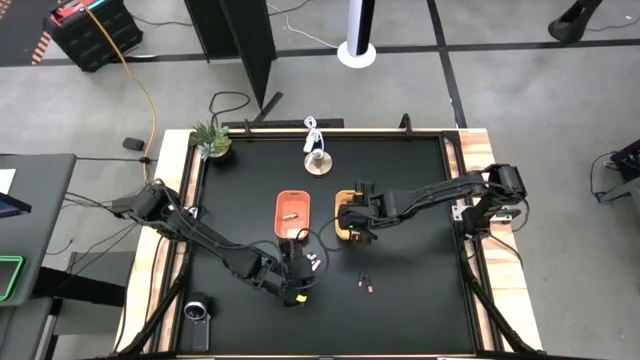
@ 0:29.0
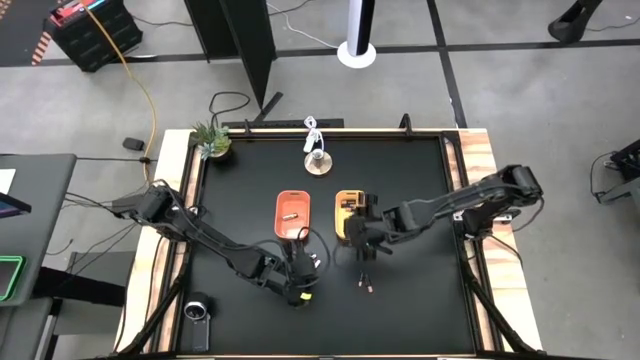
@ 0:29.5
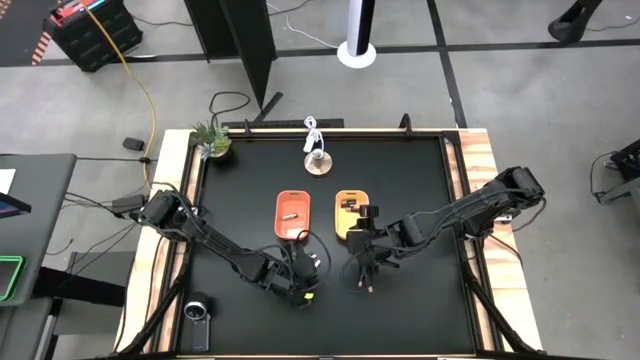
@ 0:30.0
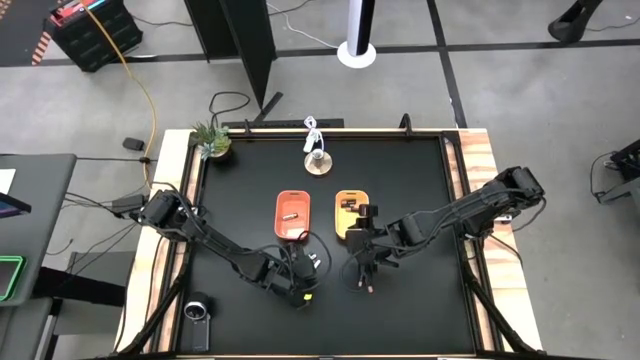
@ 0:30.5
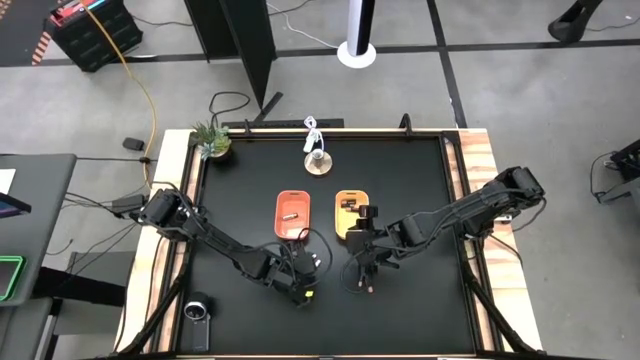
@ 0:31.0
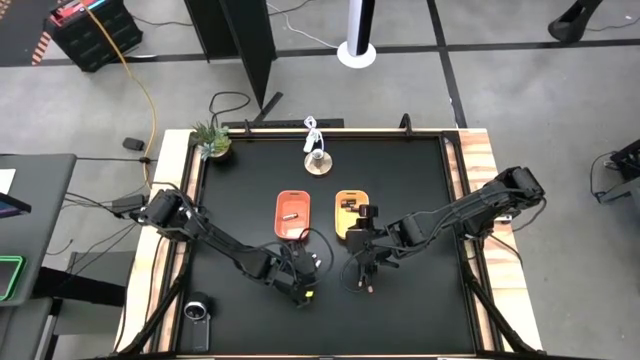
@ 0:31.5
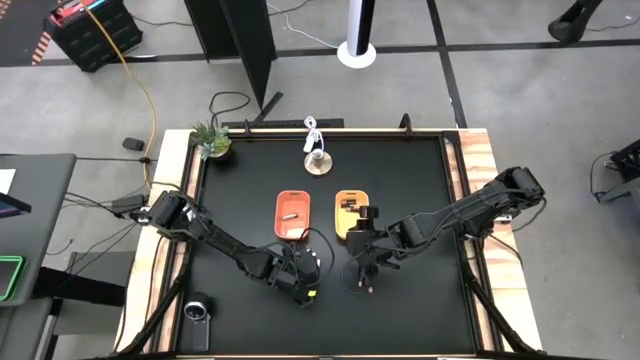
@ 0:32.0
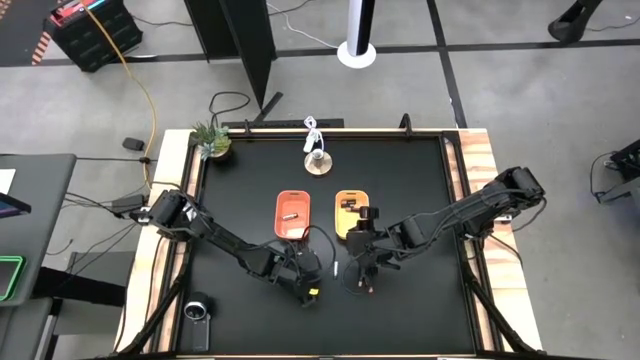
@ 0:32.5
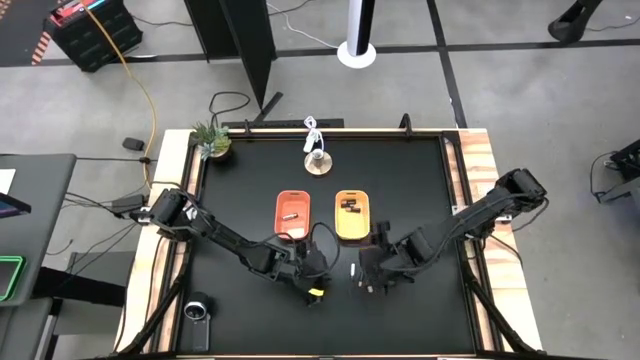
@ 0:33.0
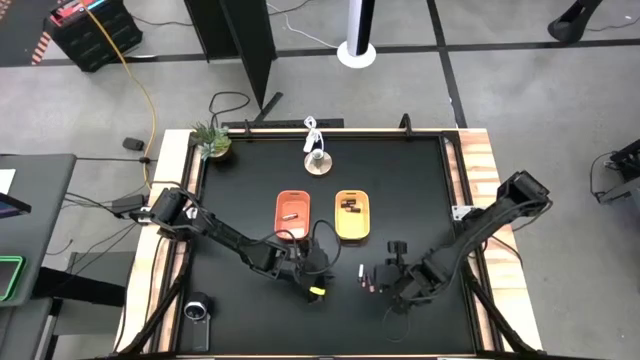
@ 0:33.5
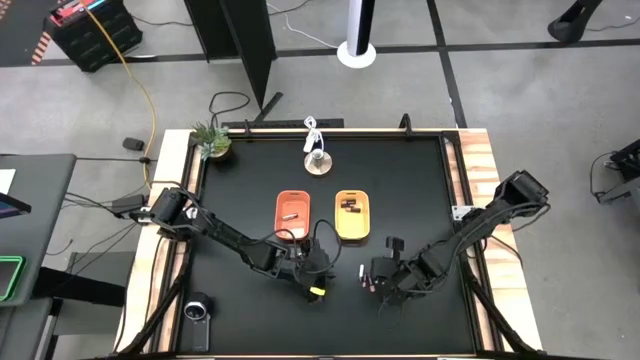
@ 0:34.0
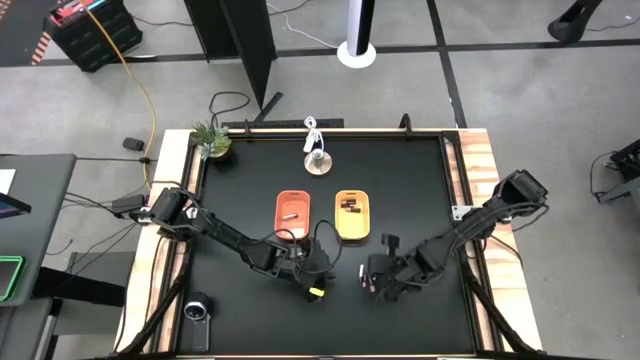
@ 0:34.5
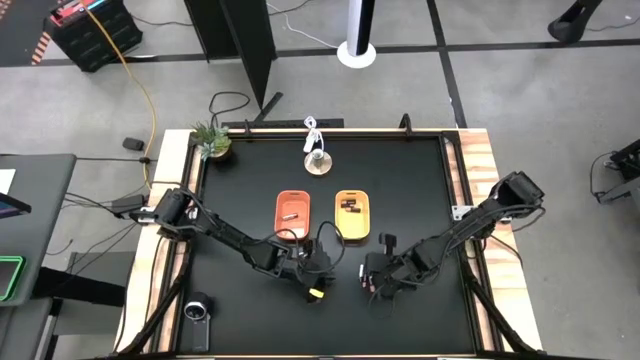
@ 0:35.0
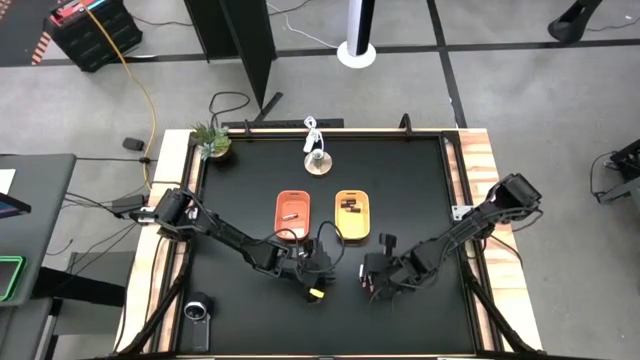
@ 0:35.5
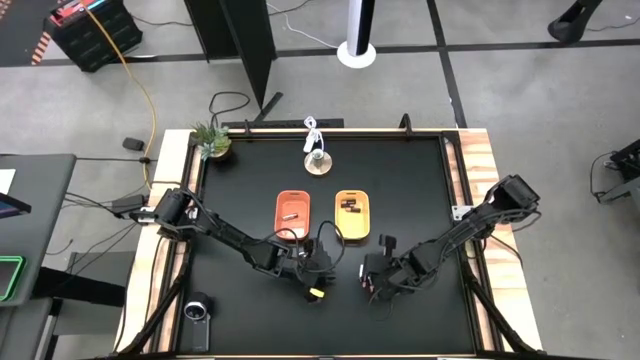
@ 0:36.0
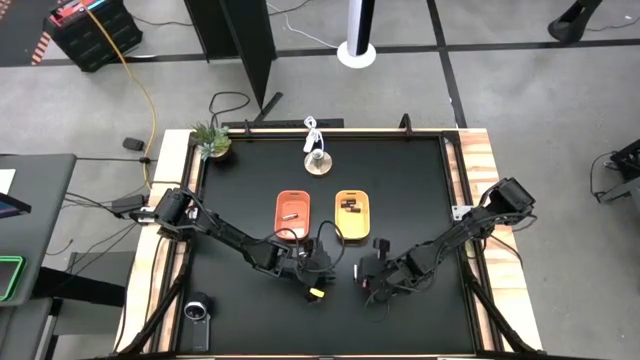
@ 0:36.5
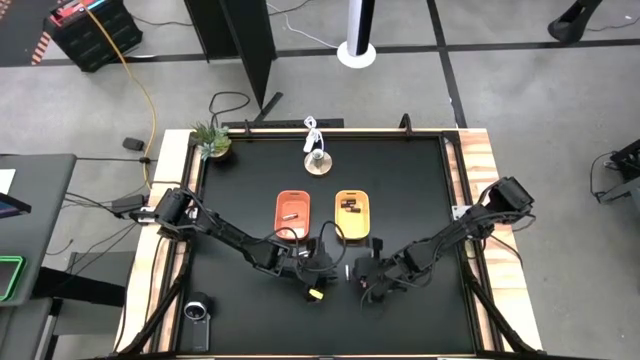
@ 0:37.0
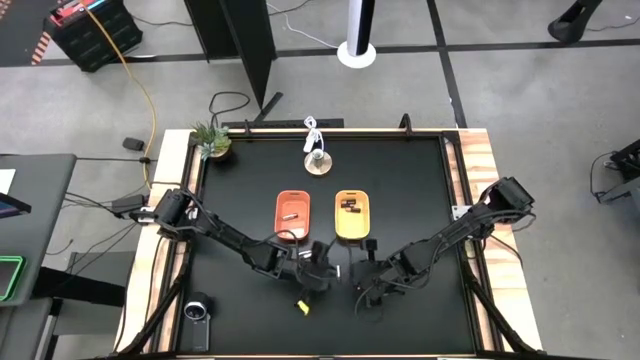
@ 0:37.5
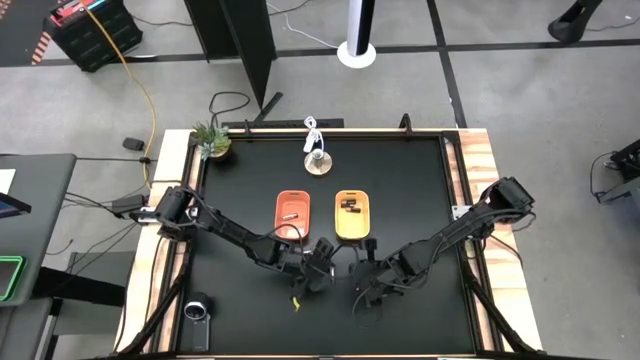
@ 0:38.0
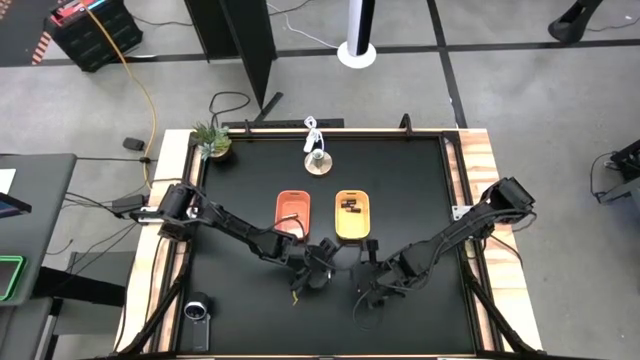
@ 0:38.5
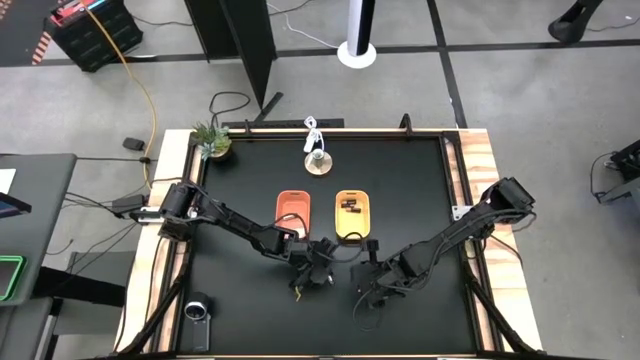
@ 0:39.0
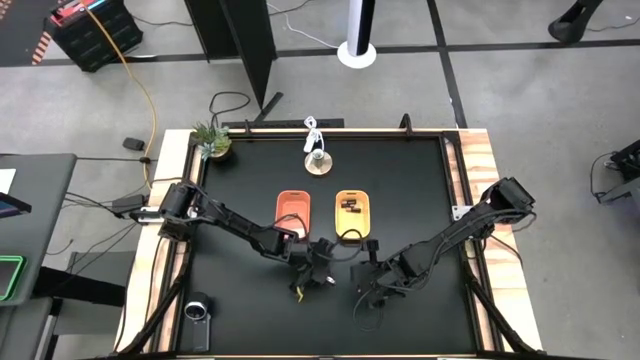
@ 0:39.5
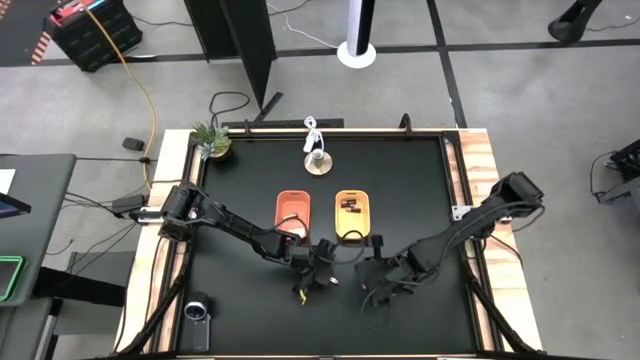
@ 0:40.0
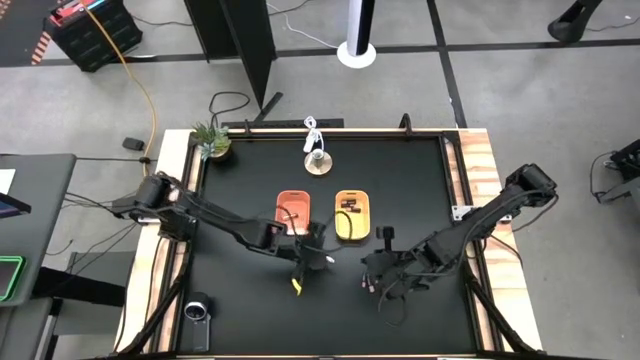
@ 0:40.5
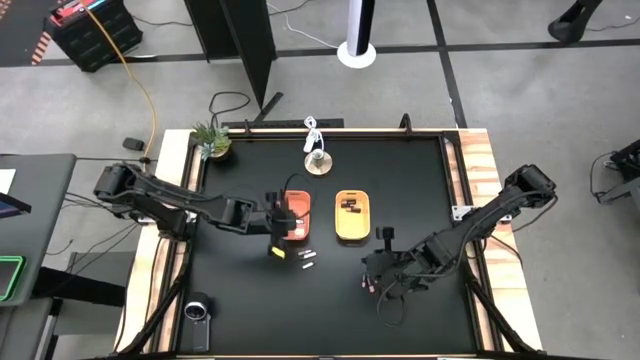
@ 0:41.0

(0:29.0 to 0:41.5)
Task: Sort batteries
Put the silver battery into the orange bin

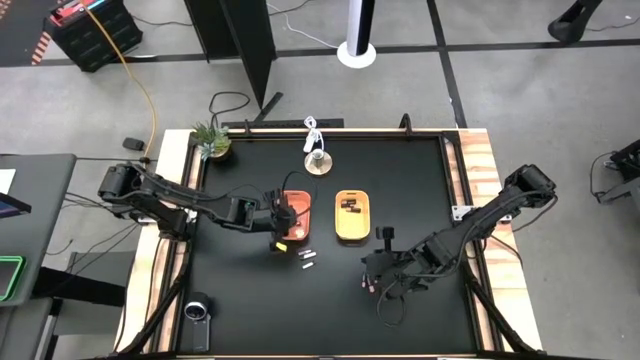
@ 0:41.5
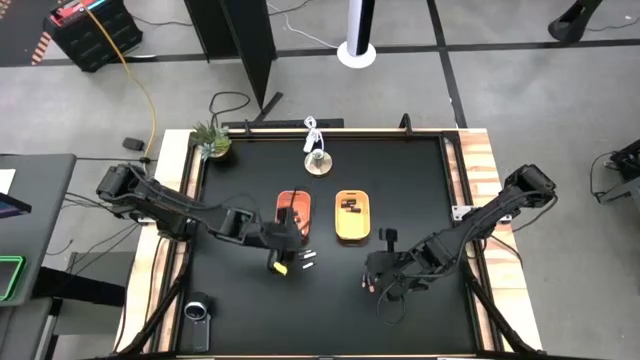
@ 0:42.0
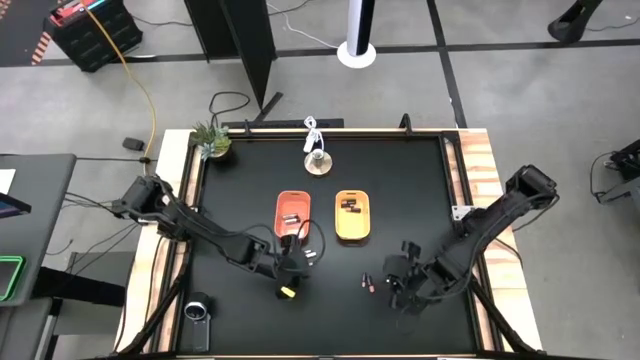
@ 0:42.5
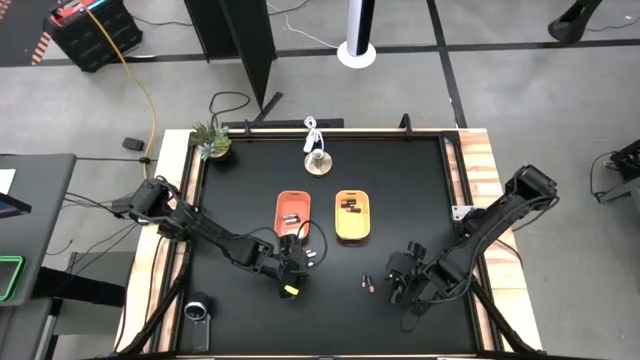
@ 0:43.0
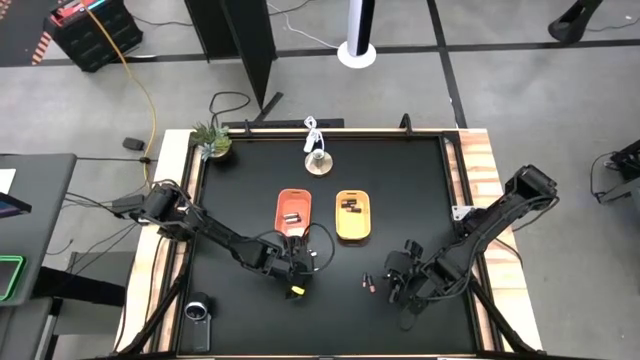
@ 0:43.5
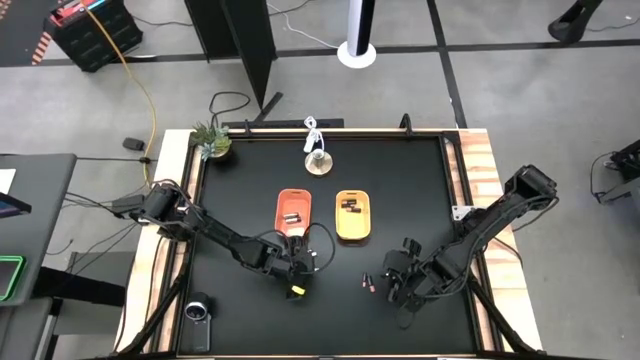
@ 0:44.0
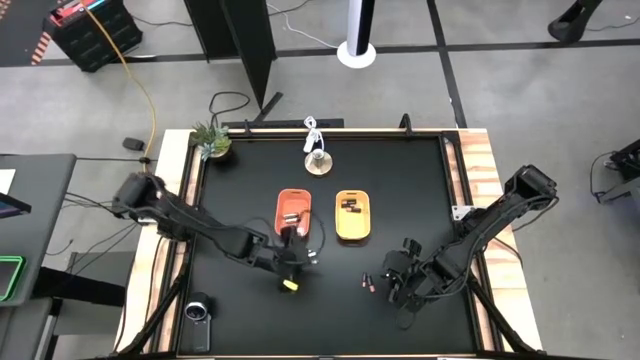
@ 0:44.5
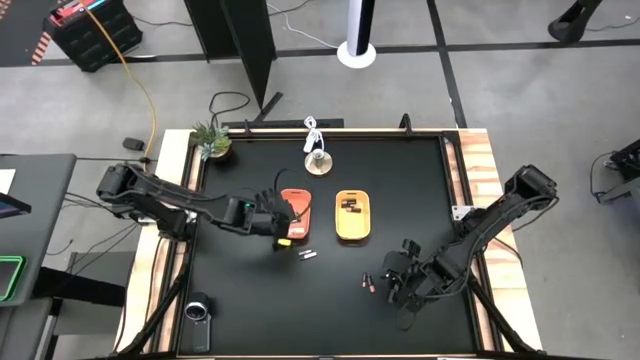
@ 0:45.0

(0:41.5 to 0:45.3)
Put the silver battery into the orange bin

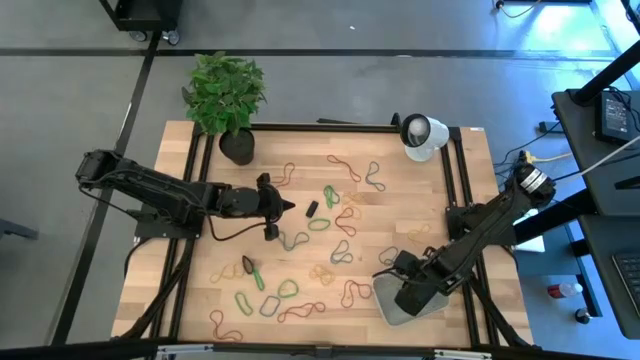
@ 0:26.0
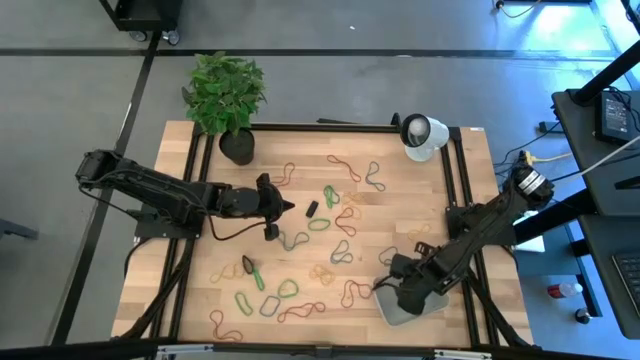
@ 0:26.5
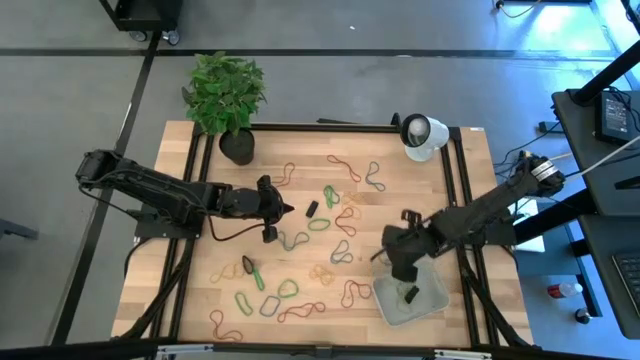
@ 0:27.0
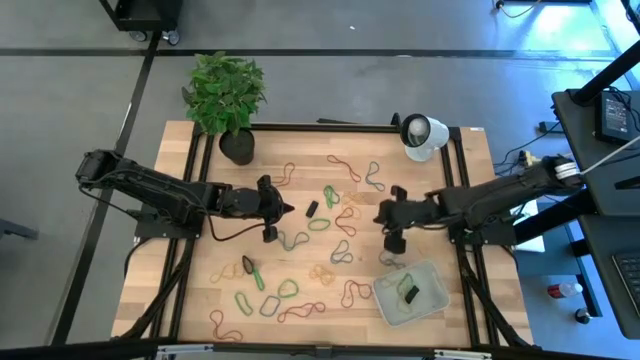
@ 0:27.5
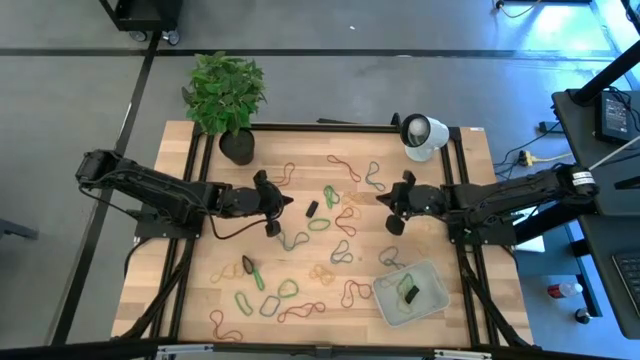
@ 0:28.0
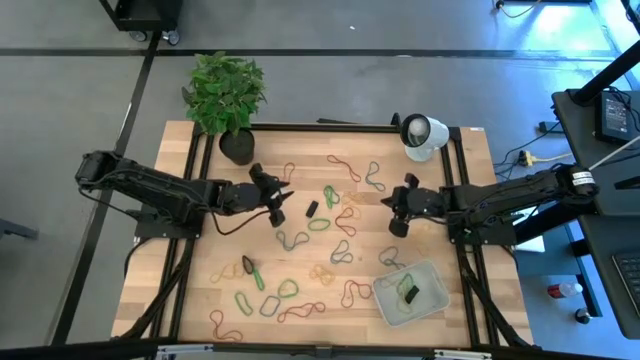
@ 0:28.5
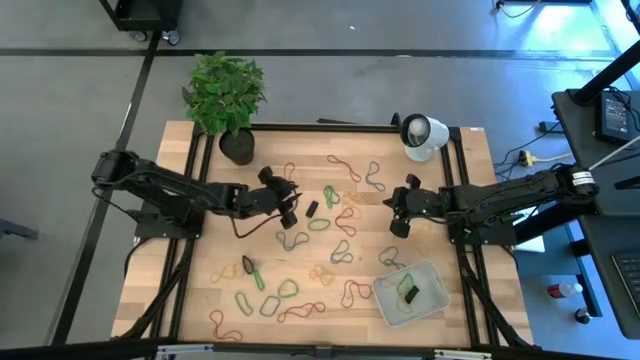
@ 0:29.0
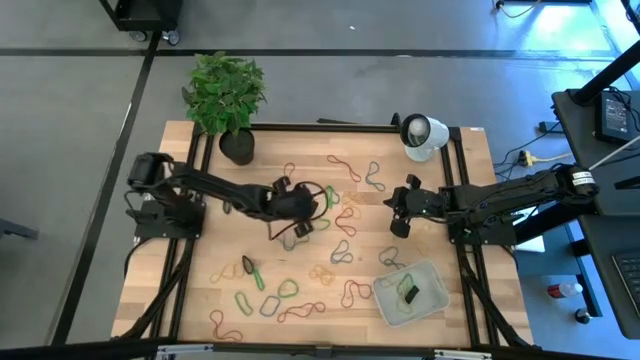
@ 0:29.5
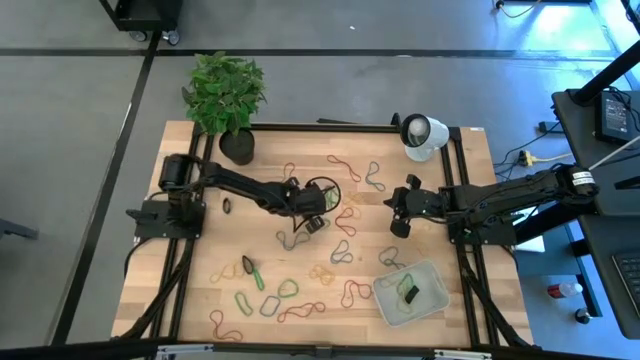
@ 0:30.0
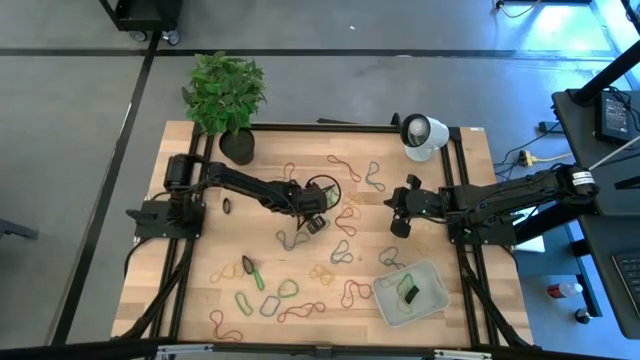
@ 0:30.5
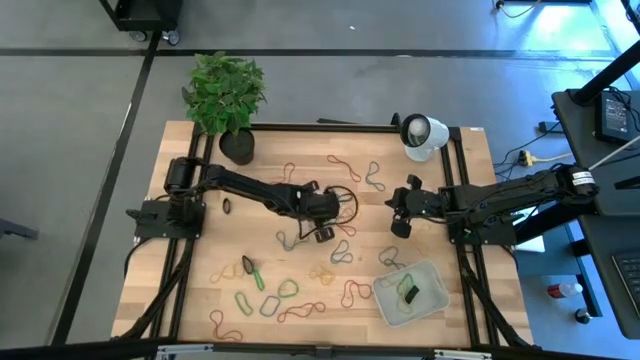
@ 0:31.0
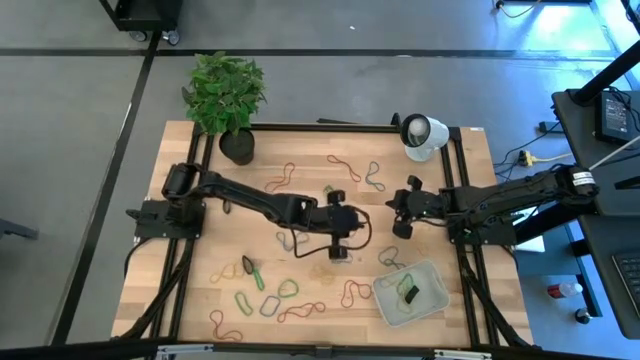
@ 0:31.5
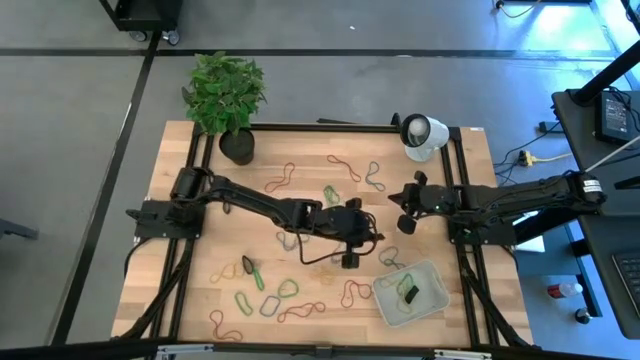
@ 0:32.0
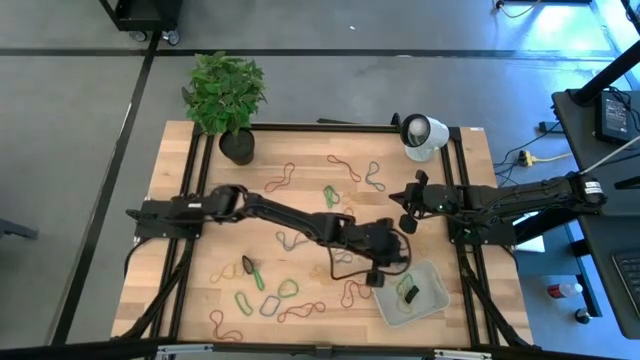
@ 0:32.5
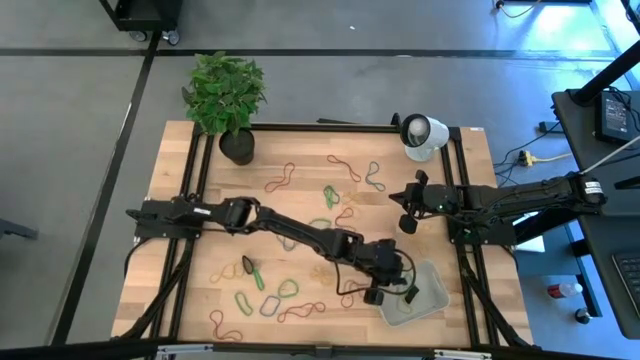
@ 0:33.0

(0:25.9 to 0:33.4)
Task: Pick and place rubber bands into bin
Put the black rubberband into the white bin
